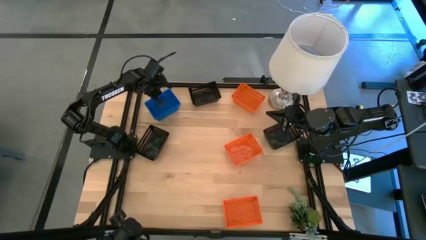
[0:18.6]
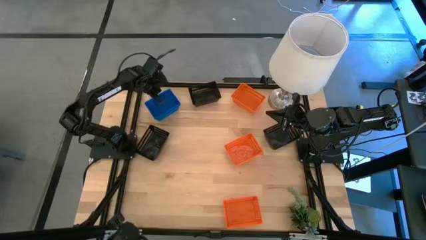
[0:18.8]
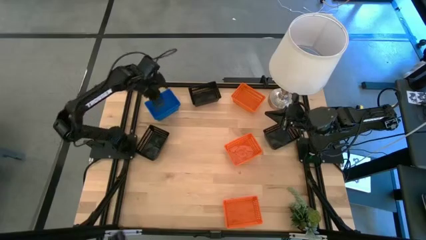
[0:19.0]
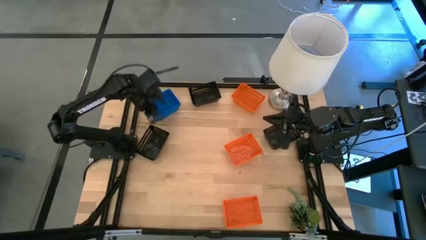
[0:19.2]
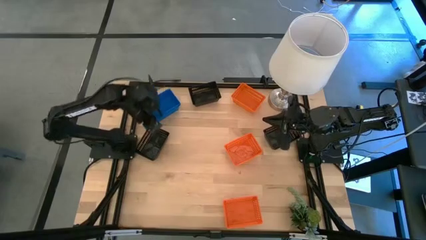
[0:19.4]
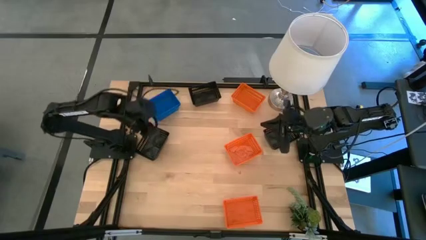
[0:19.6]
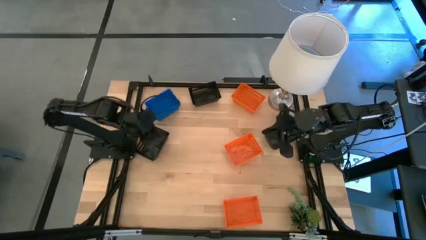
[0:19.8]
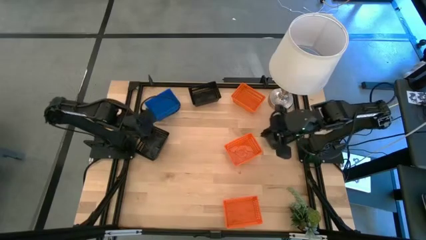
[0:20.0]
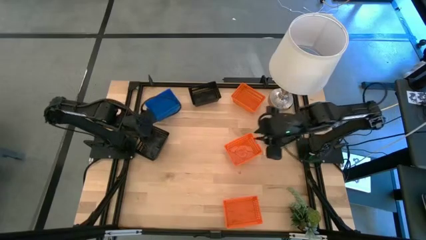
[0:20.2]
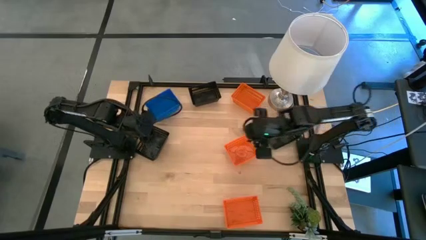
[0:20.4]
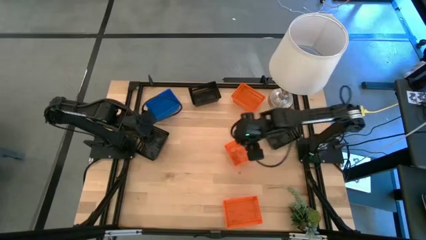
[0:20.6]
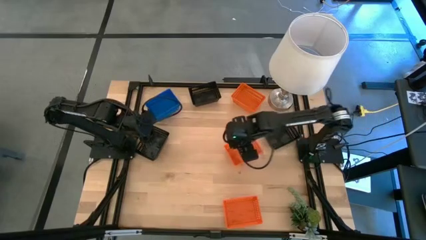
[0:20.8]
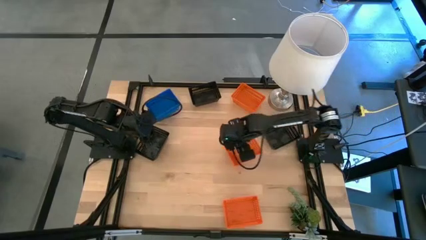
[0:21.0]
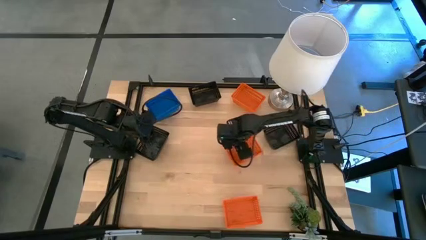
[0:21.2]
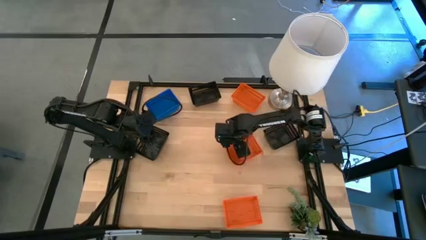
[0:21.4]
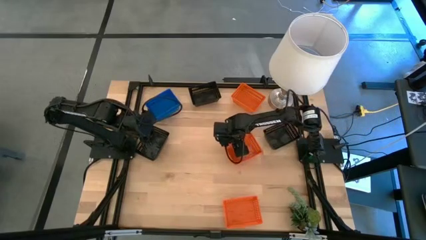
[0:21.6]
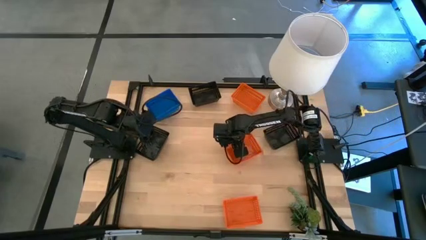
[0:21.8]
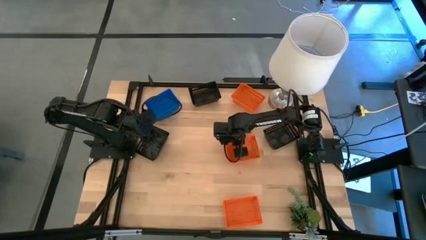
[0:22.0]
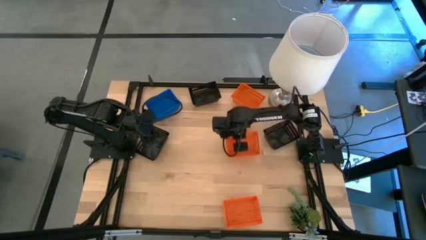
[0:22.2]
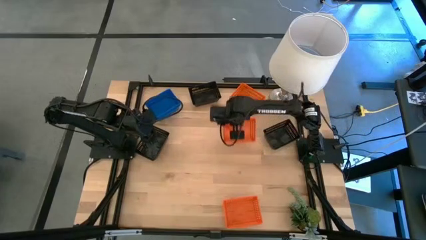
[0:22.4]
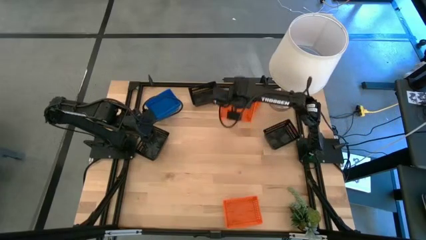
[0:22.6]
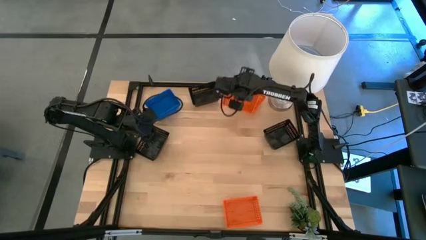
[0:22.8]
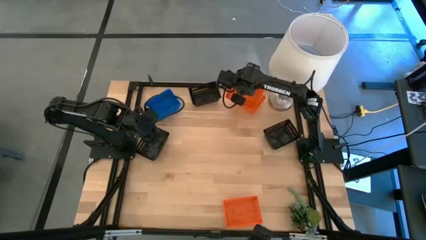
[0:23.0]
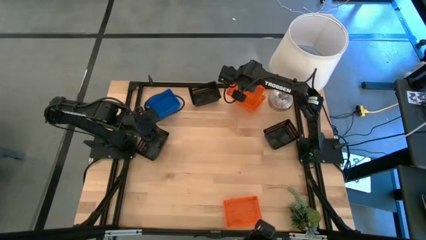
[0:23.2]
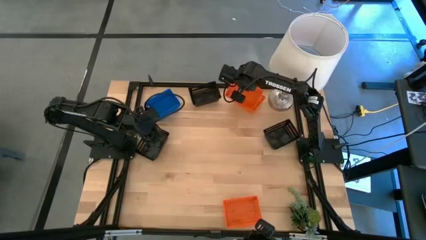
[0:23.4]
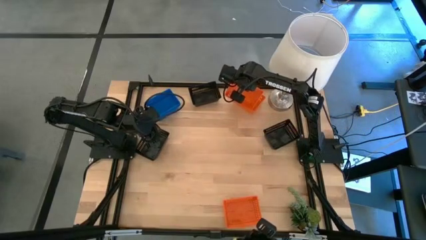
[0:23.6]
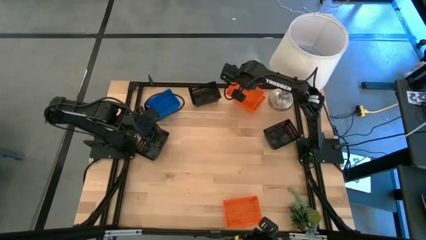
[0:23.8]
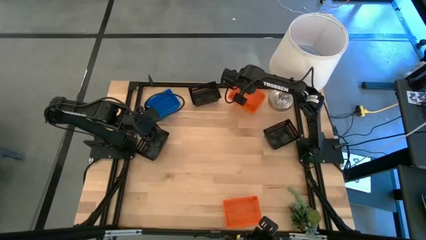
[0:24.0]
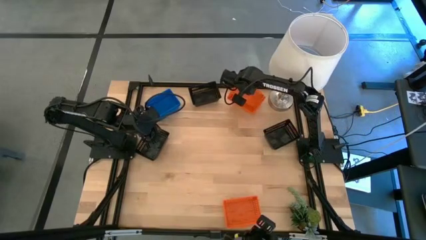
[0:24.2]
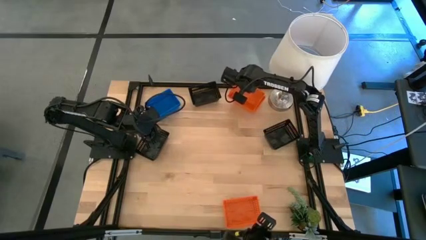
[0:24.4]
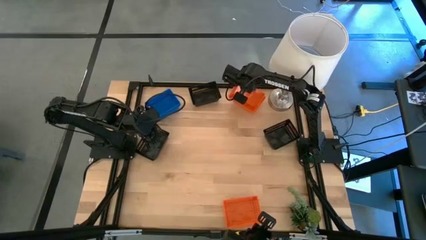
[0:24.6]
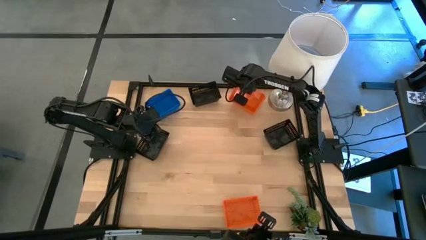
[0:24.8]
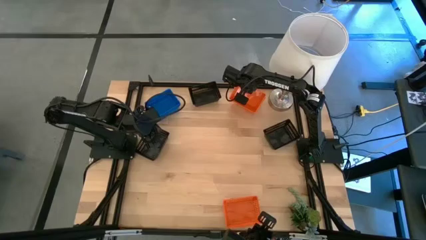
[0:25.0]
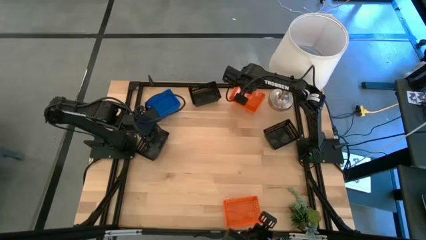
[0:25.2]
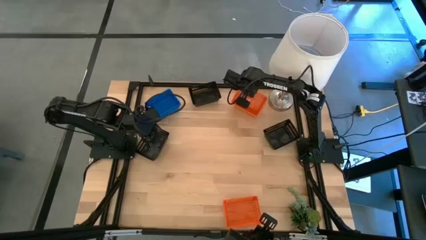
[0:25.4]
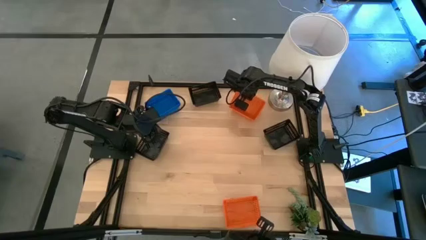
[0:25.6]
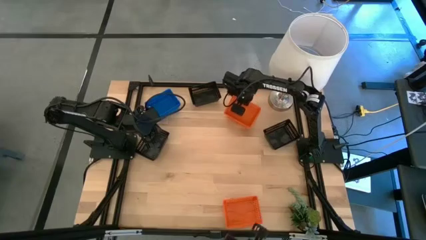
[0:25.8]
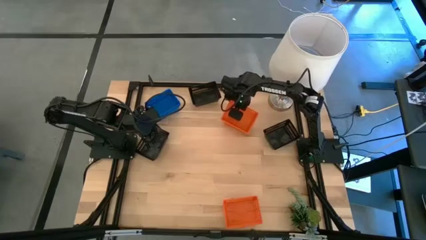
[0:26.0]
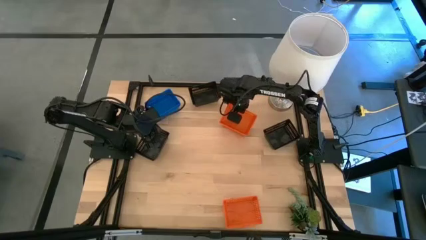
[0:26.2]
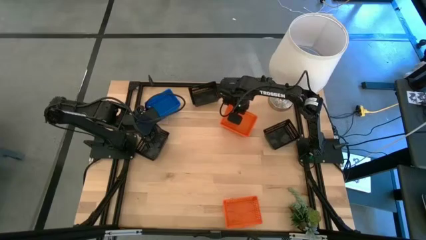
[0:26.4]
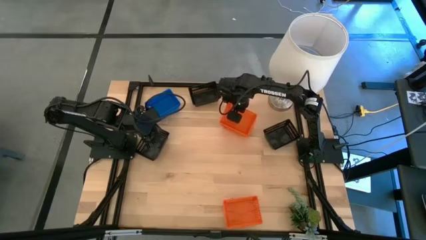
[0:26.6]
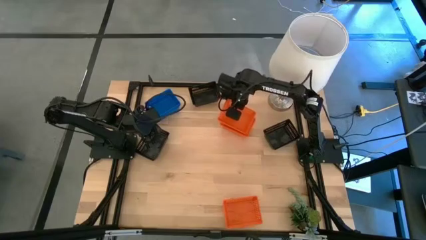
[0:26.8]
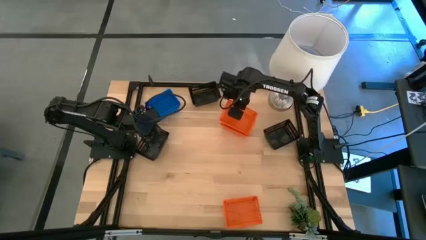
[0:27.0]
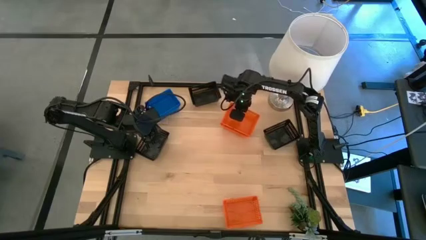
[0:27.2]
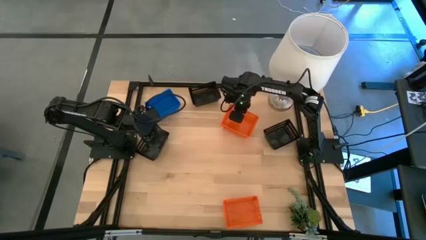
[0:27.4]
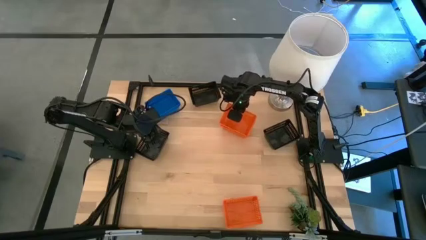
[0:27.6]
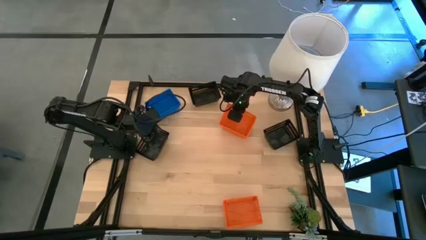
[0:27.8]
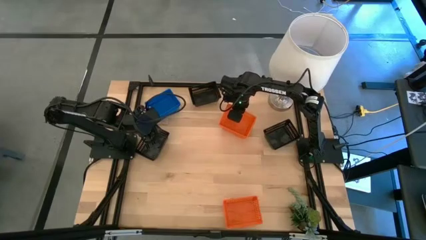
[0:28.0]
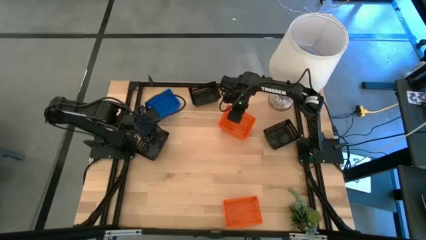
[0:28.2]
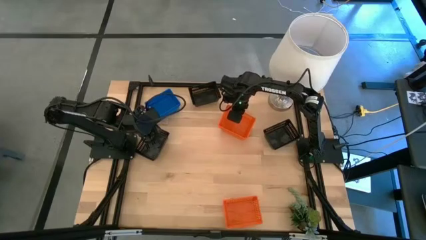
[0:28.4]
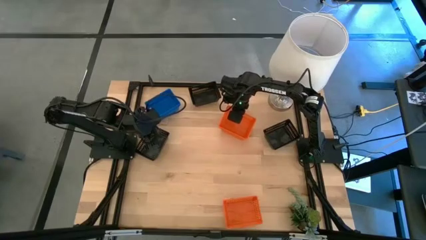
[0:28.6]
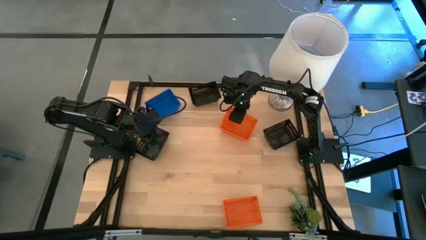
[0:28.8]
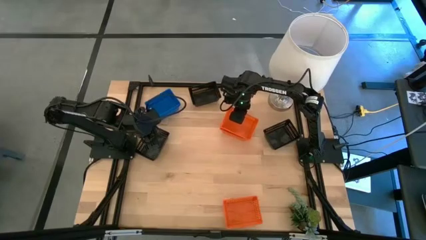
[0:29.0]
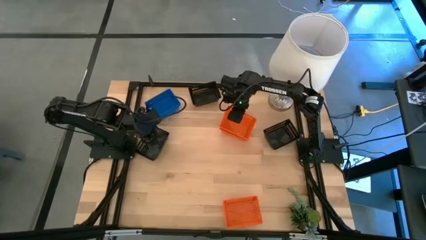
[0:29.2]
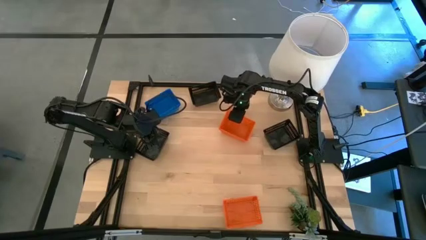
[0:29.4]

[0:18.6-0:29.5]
Stack the middle orange bin on top of the top orange bin

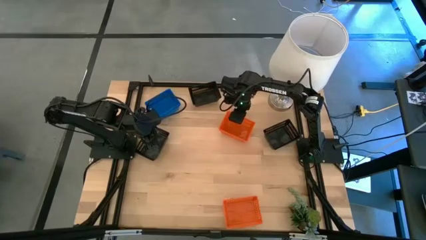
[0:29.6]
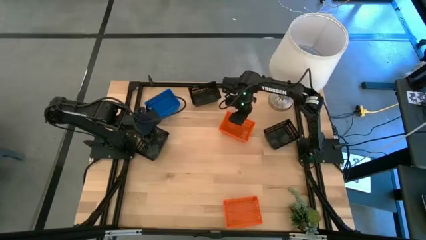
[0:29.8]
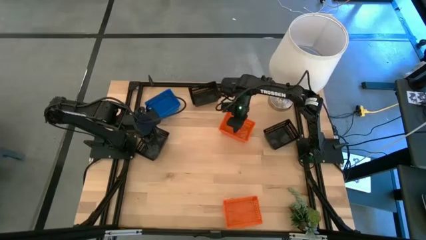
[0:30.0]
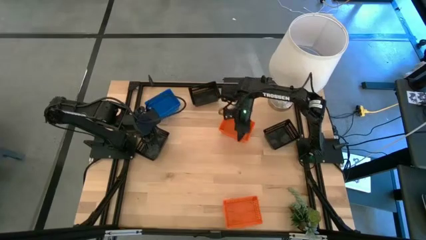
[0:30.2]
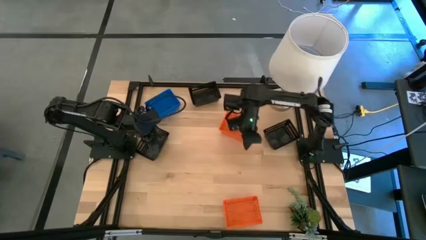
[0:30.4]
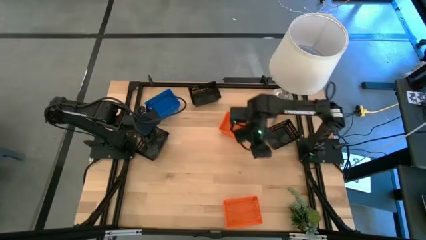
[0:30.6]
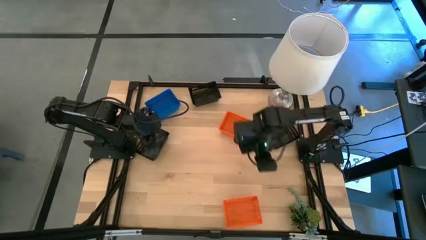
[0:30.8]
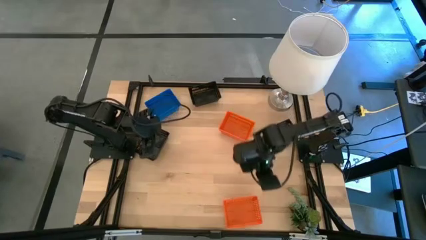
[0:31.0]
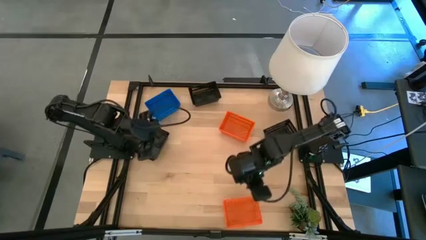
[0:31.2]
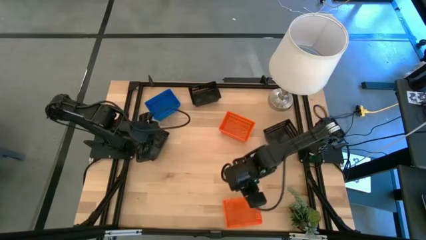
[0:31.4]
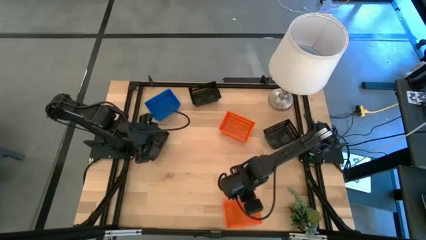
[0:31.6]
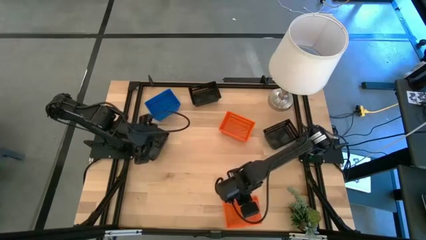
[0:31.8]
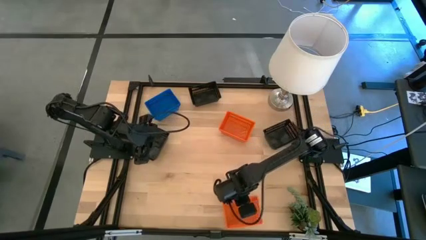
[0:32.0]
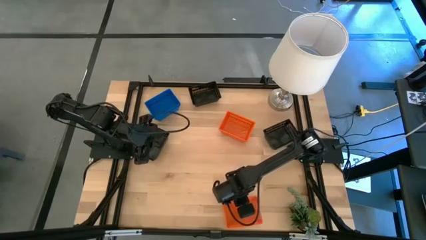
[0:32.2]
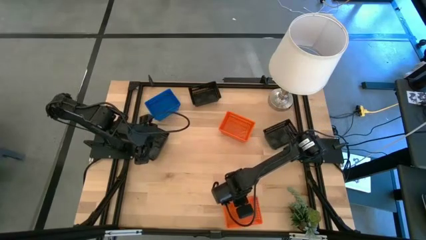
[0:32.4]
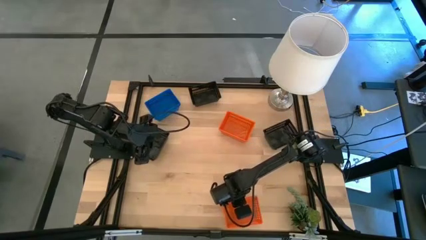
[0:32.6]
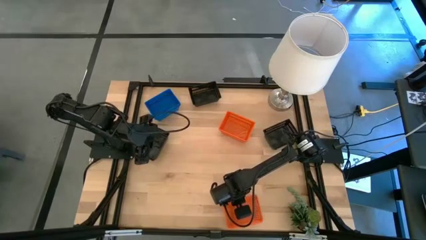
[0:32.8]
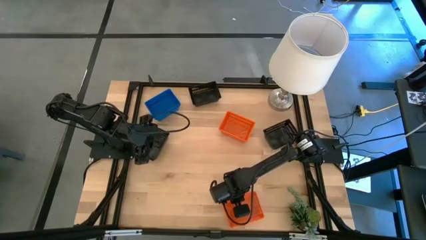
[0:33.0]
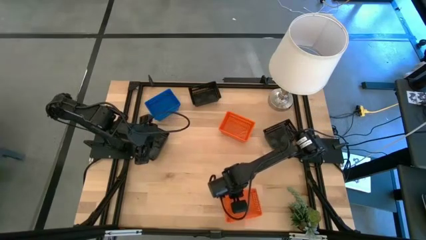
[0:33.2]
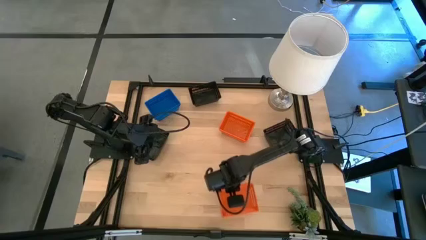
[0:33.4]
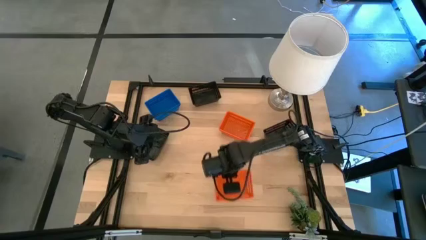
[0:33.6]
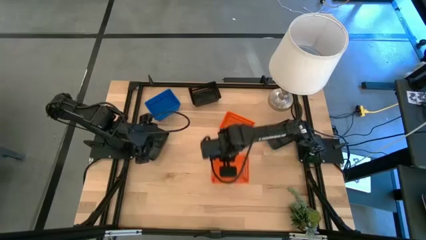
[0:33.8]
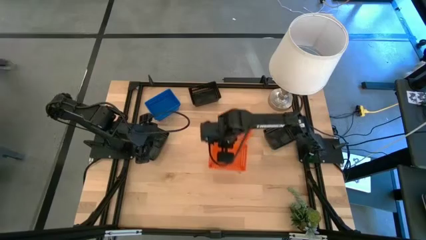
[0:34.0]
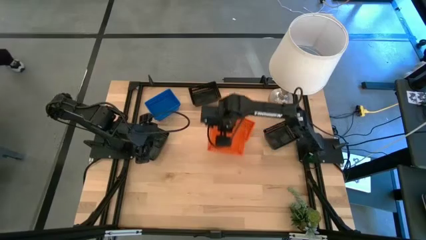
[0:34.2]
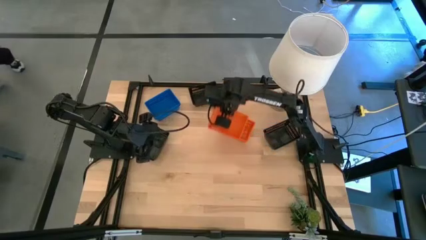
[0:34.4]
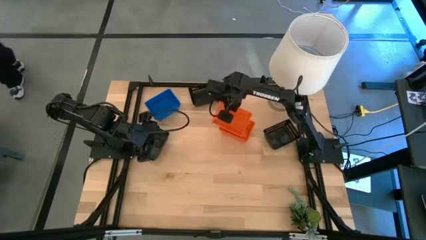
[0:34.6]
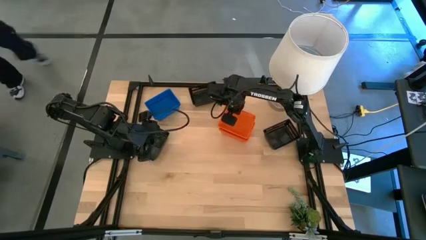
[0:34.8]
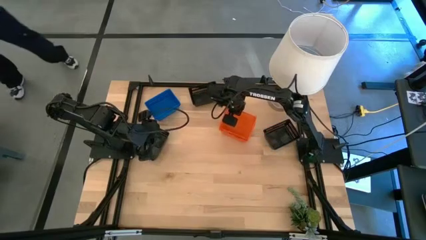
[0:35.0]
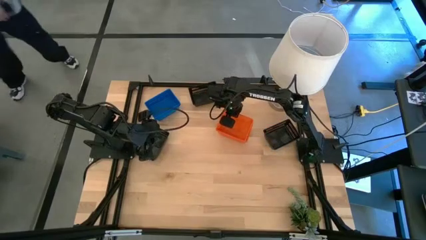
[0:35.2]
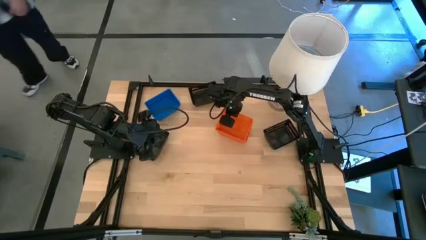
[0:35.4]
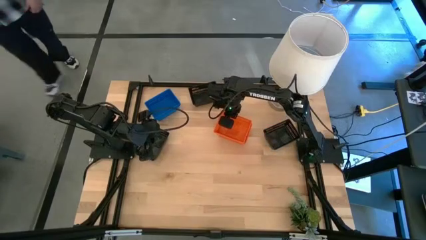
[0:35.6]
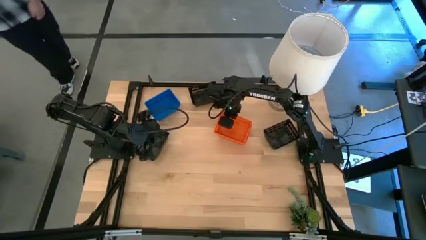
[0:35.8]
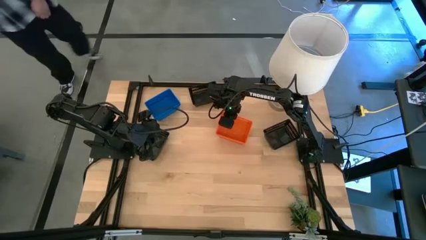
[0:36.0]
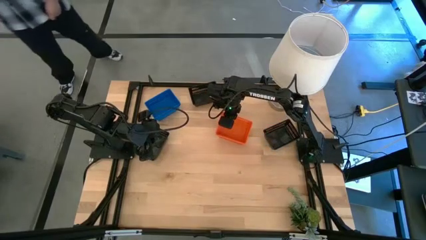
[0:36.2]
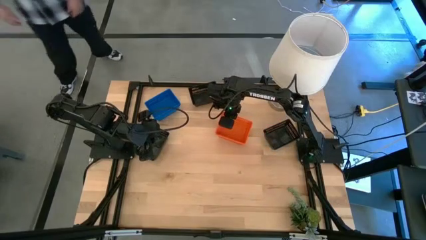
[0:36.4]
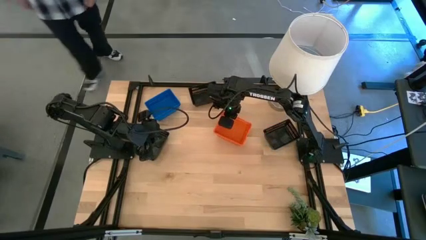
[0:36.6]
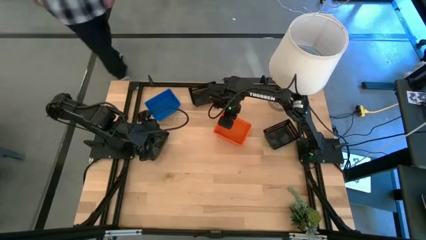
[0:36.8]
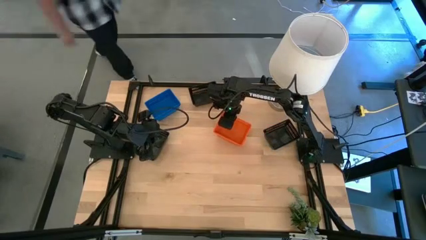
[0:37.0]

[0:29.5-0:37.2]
Stack the bottom orange bin on top of the top orange bin
